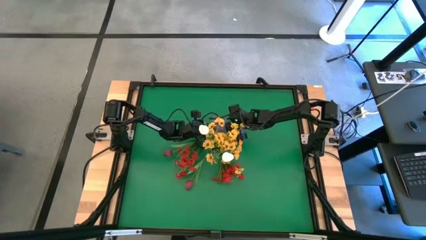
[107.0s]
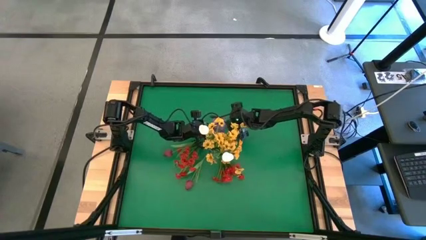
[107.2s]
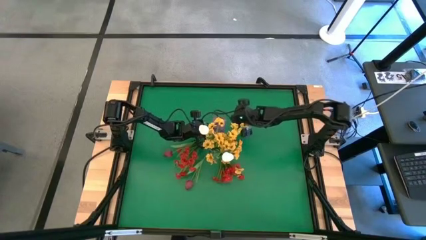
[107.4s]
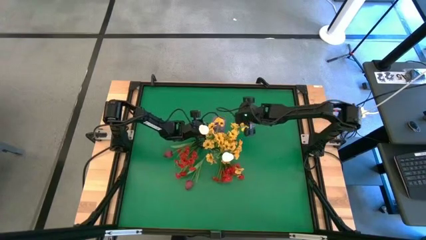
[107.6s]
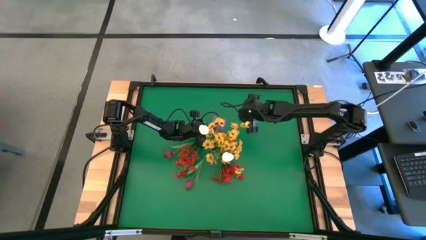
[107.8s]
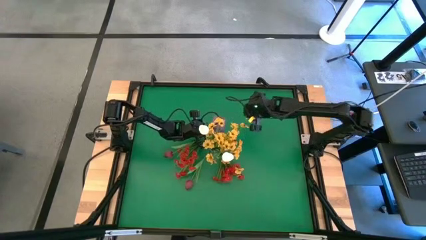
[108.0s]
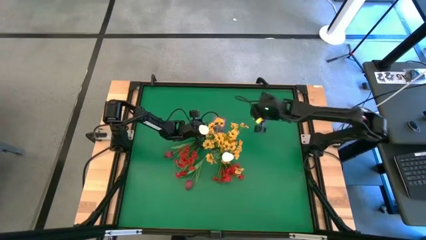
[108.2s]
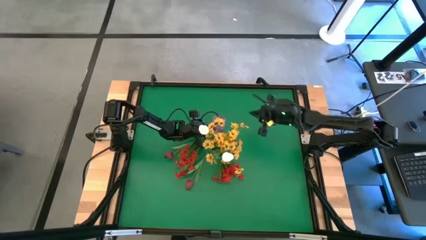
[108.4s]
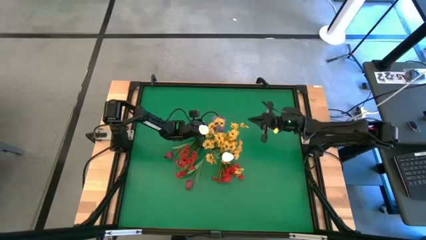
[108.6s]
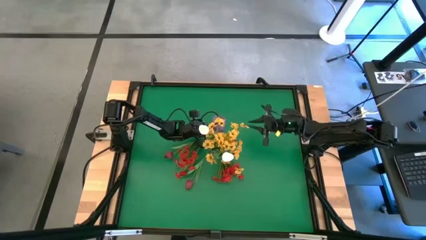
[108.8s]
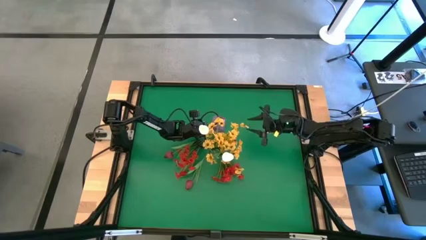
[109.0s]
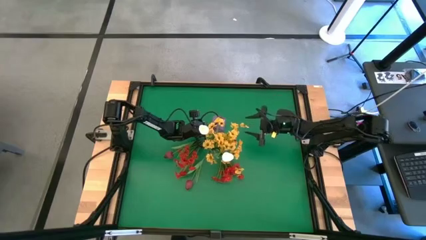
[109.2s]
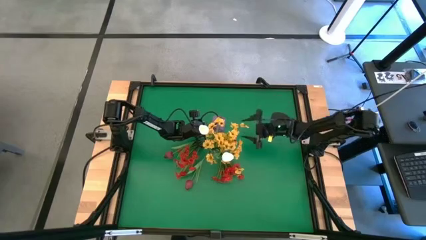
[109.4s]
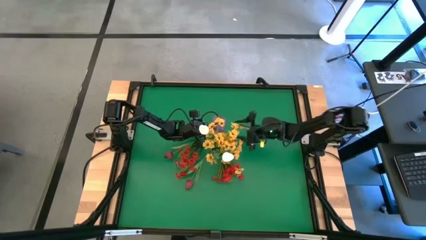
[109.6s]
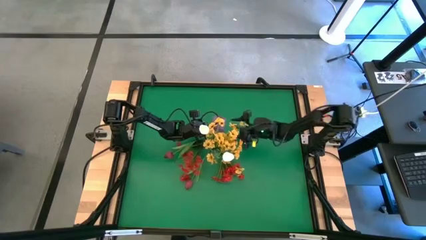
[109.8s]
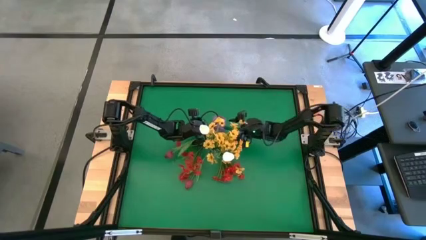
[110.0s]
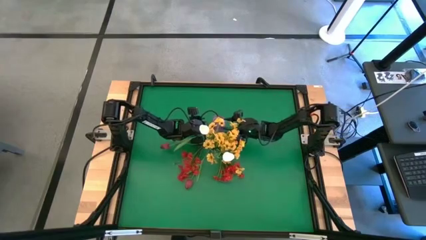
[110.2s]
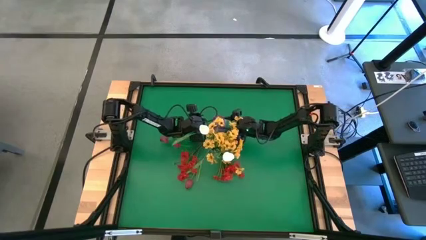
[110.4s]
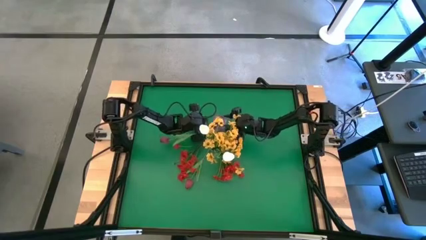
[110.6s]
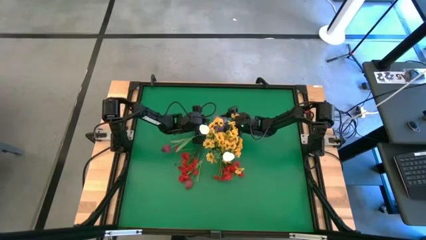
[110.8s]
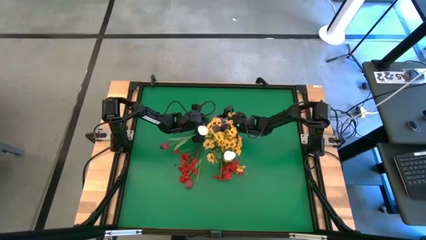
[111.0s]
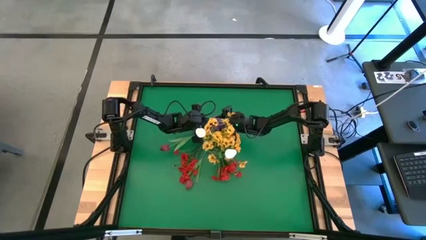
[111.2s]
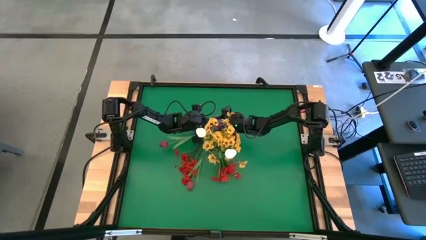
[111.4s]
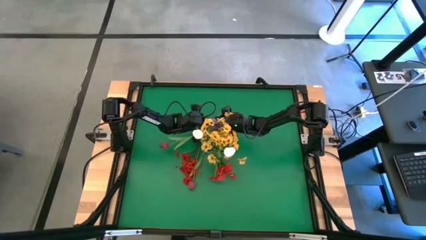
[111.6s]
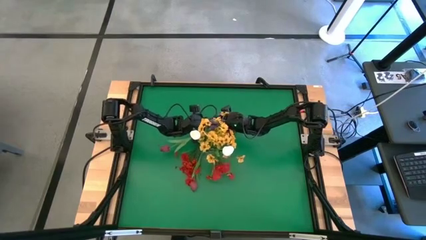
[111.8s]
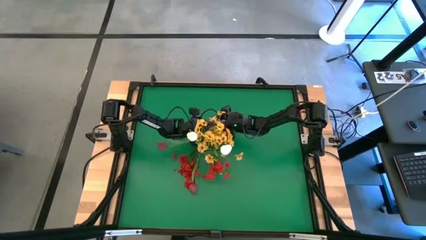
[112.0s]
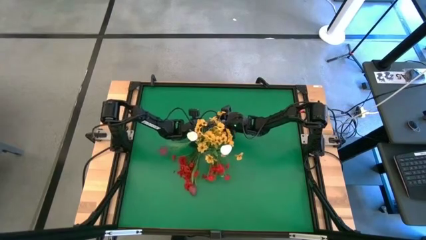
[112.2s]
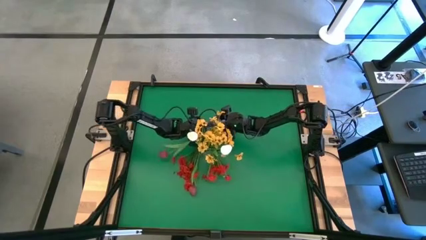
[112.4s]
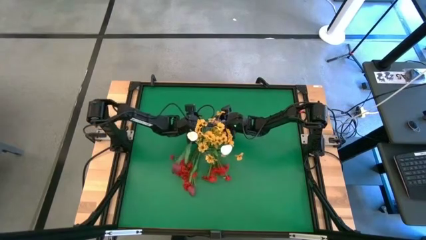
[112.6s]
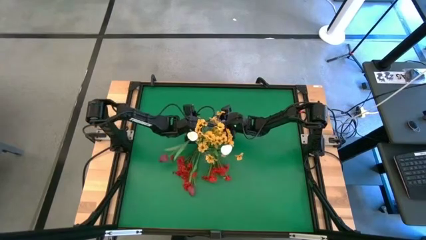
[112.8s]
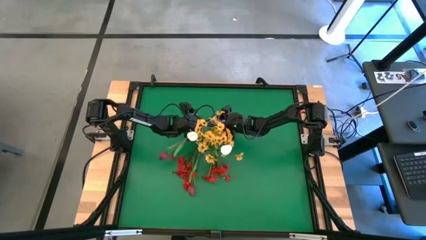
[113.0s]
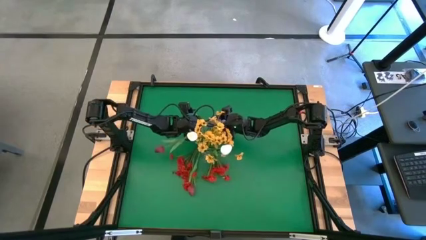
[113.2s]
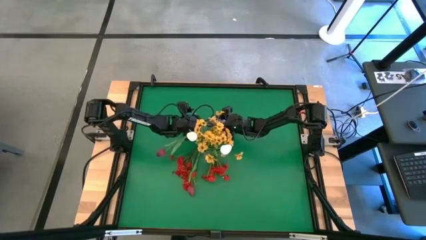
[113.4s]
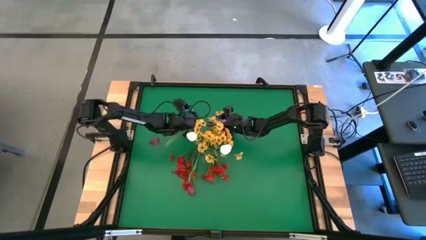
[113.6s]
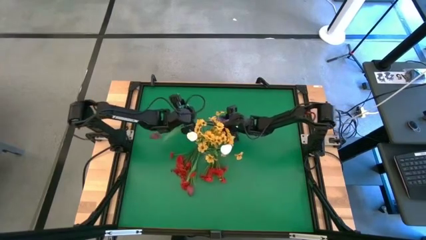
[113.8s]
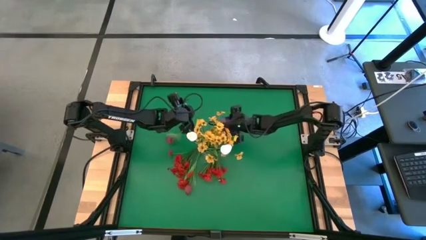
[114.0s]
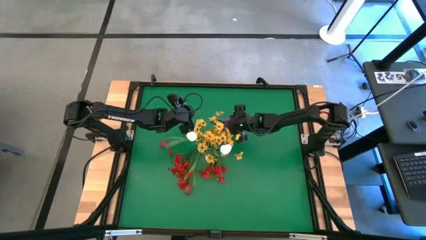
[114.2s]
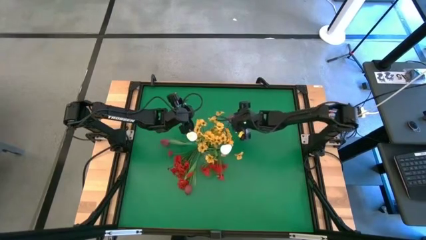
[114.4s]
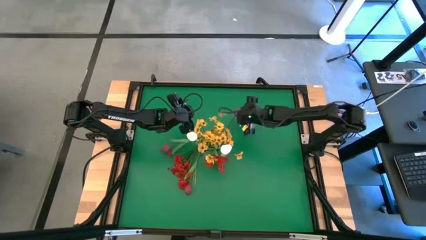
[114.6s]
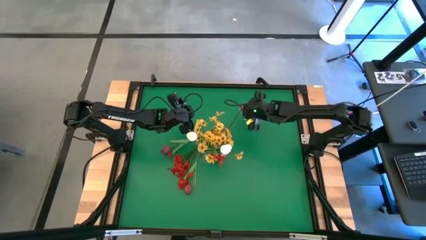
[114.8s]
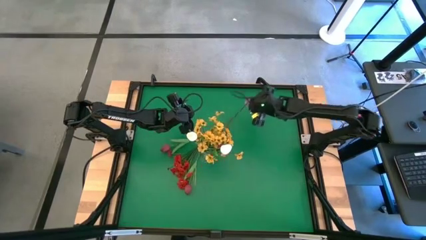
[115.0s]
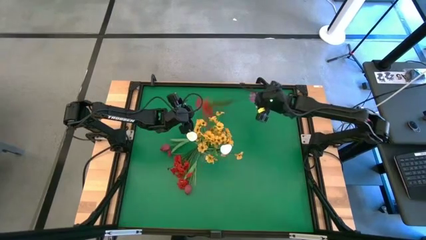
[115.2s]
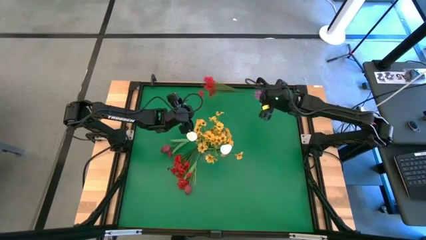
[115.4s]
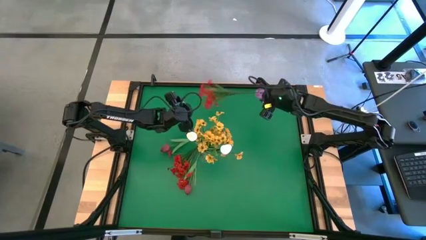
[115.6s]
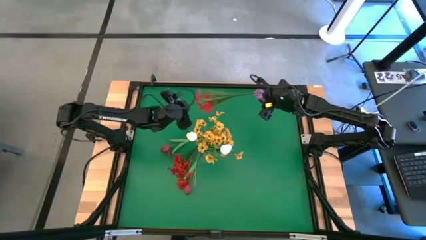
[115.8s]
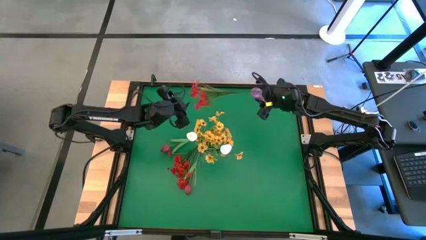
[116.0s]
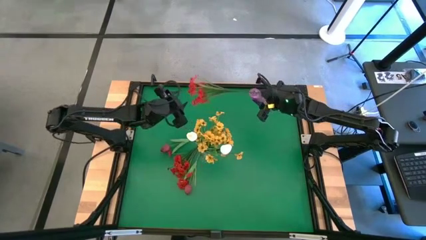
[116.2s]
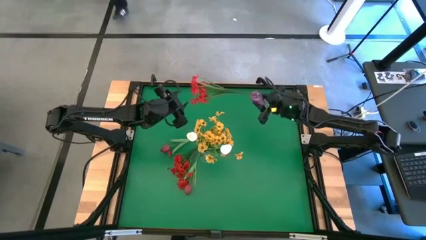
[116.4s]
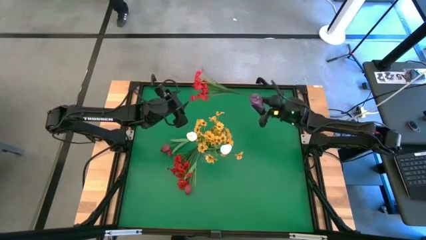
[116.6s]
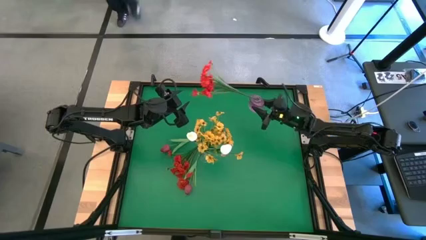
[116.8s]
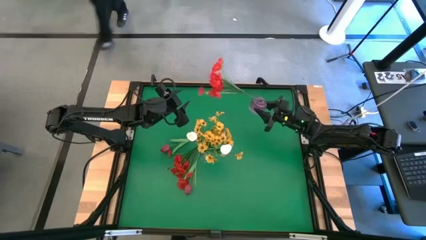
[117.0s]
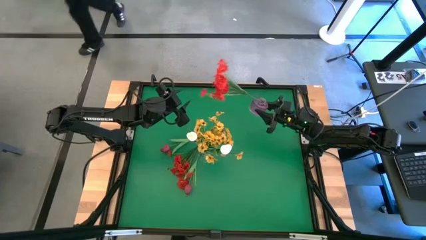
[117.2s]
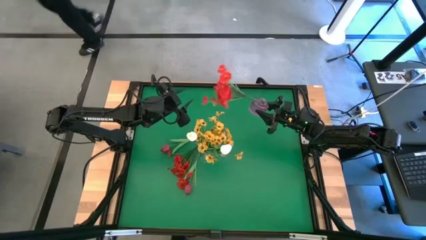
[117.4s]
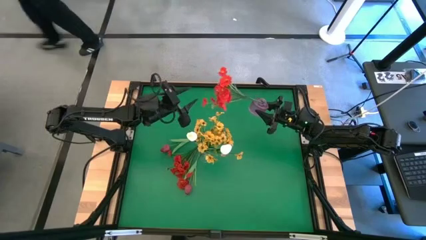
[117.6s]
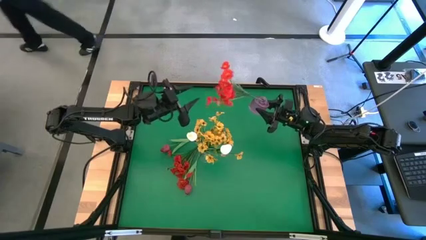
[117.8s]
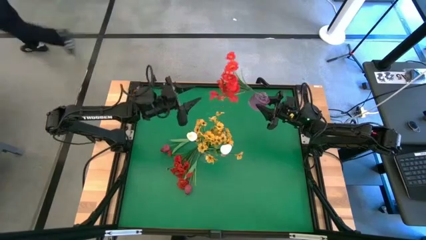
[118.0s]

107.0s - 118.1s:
Task: Sort flowers into vase by color
Adjust the violet vase

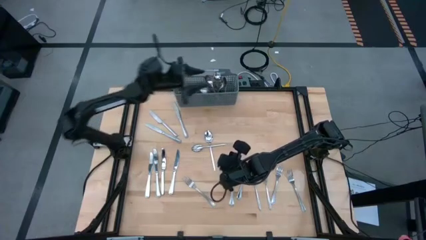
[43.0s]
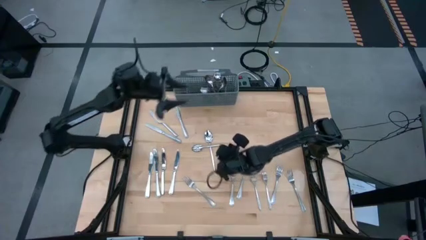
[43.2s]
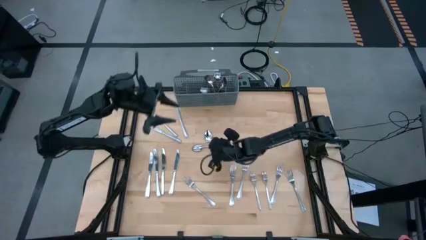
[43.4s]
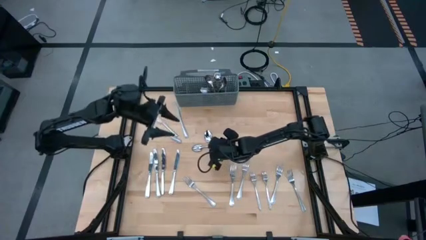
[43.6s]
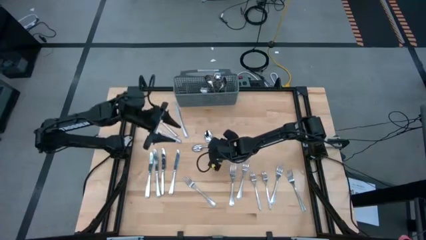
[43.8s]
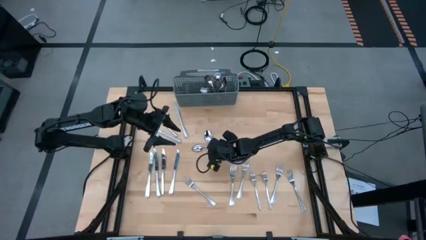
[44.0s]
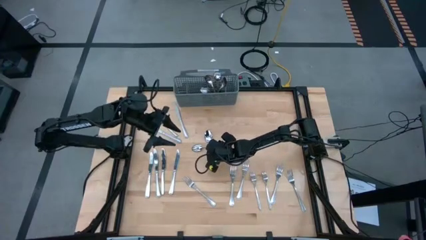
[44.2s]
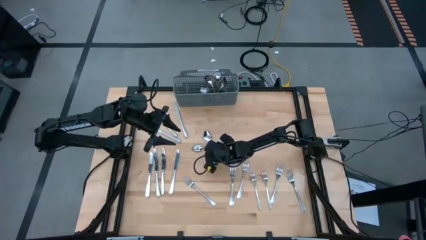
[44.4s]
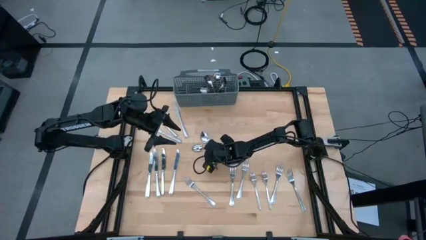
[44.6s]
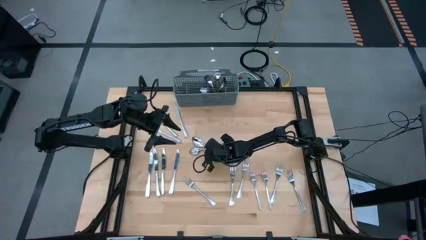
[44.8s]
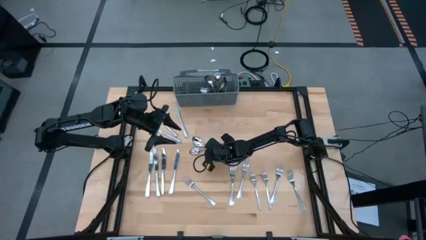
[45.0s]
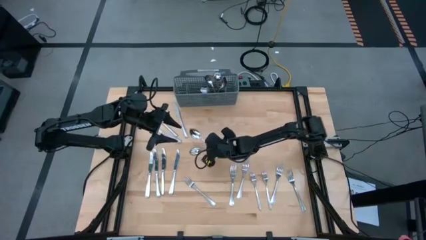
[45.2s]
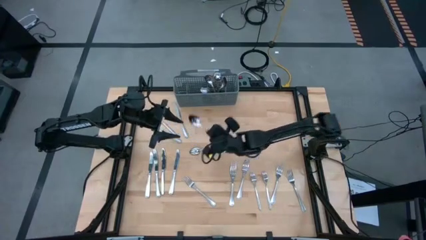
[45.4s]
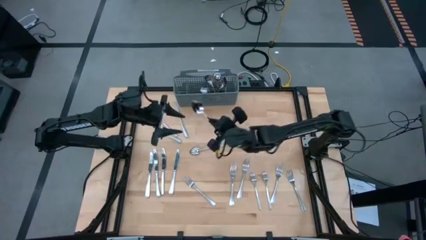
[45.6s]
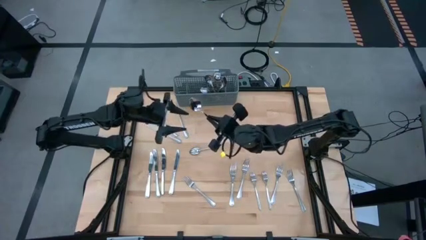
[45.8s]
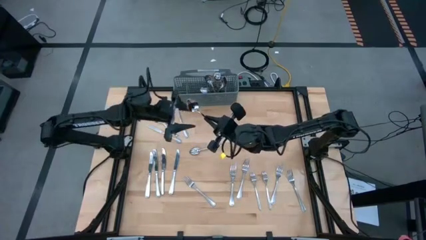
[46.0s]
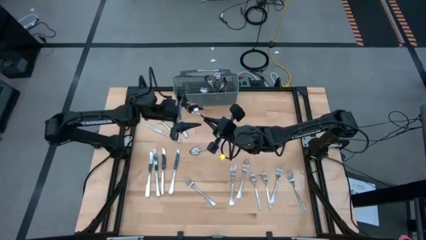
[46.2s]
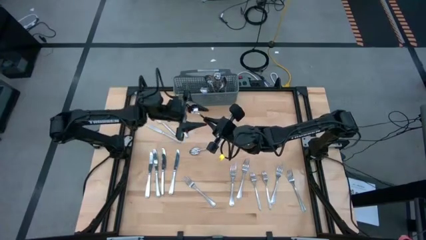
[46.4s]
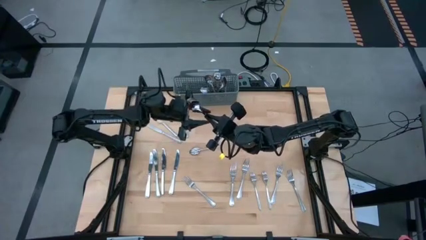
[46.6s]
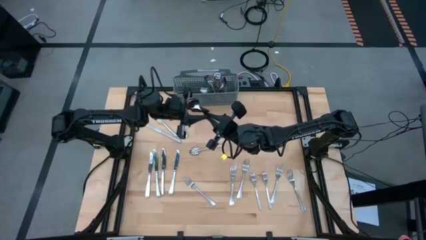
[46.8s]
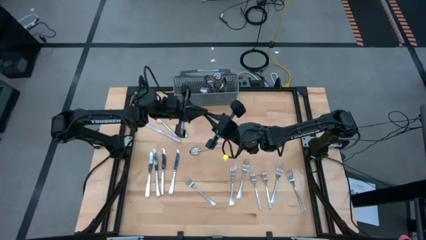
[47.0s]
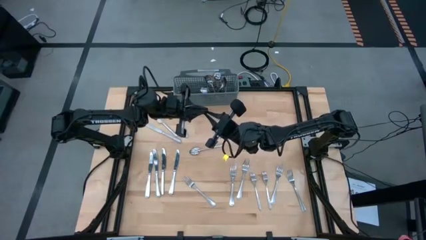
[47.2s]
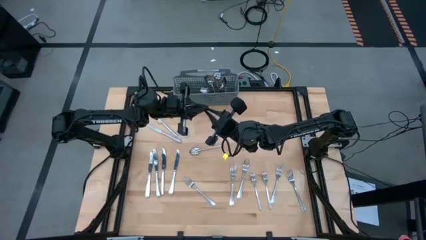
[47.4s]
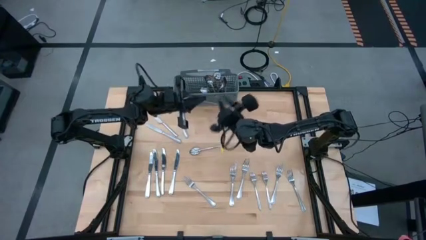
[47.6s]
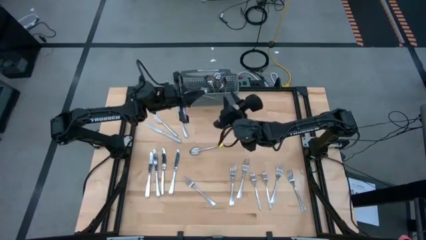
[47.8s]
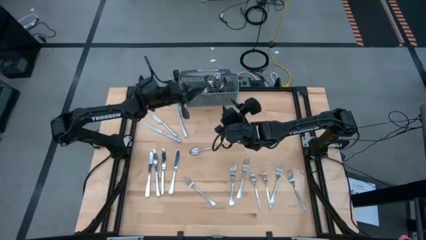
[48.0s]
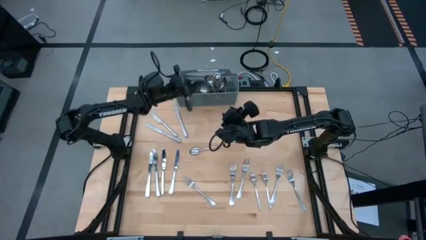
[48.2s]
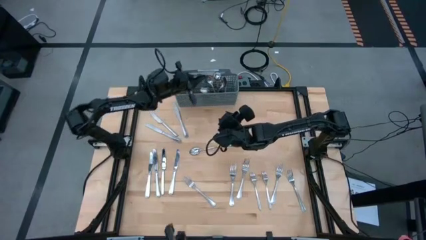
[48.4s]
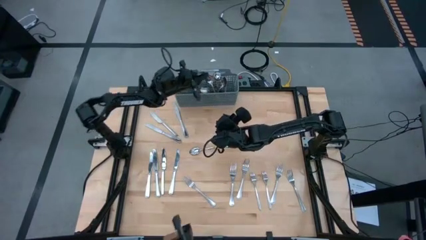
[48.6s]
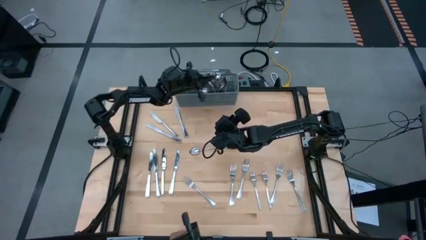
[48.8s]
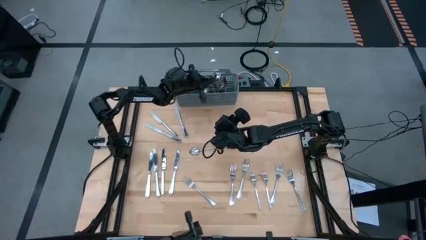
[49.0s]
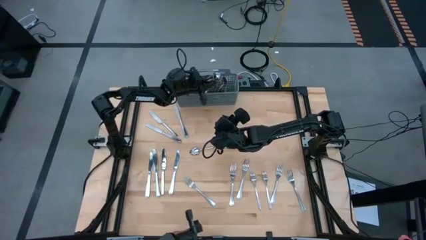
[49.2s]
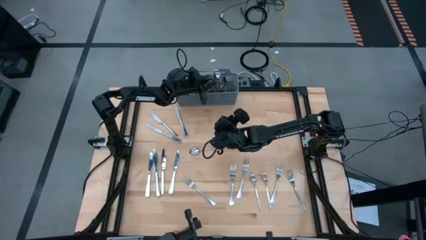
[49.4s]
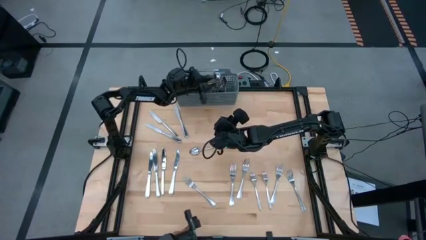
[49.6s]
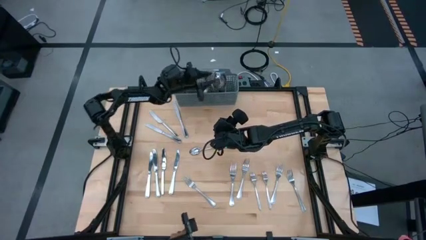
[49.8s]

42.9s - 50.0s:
Task: Sort silverware
Put the silver spoon into the gray utensil holder
